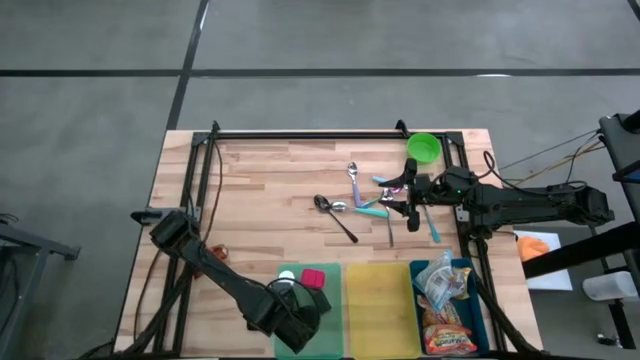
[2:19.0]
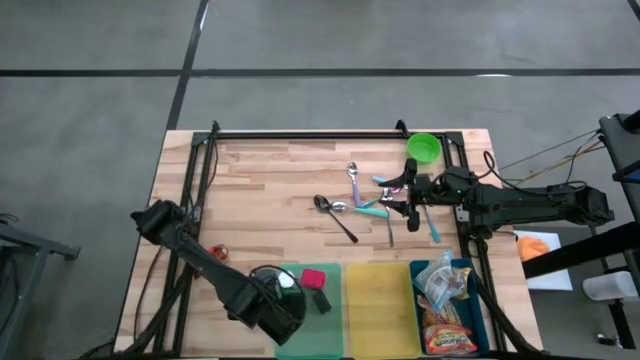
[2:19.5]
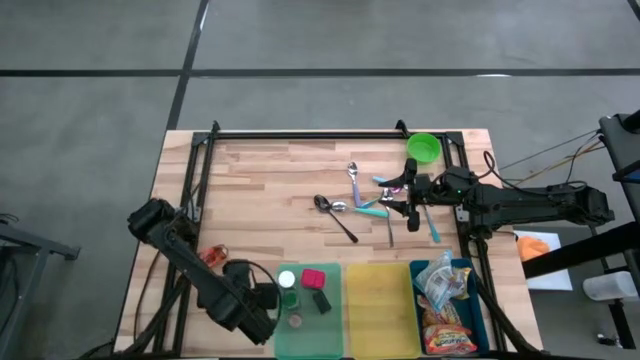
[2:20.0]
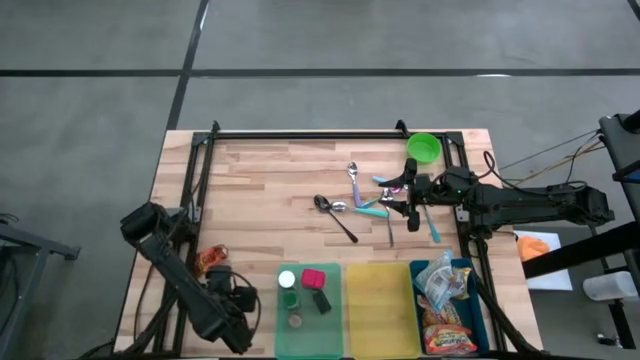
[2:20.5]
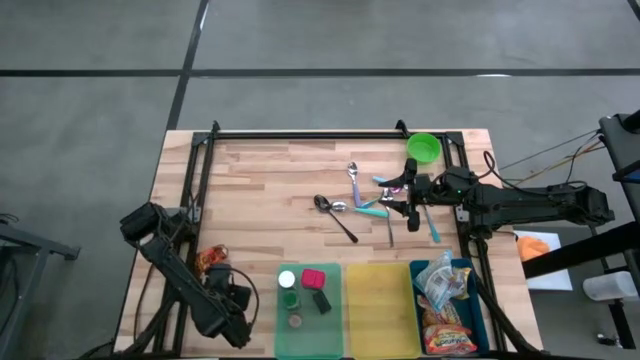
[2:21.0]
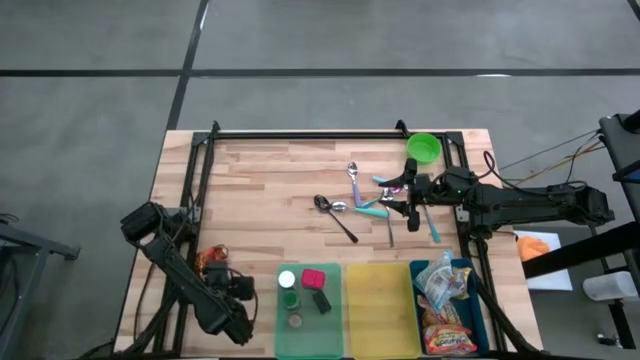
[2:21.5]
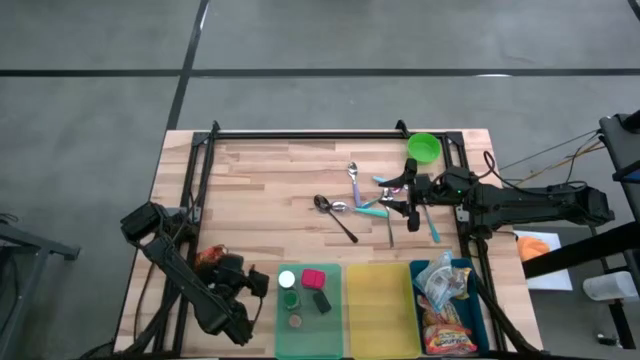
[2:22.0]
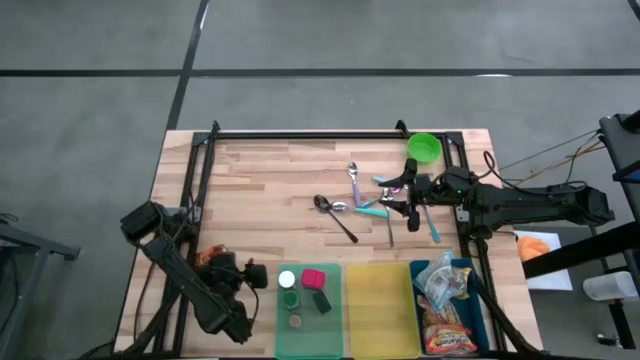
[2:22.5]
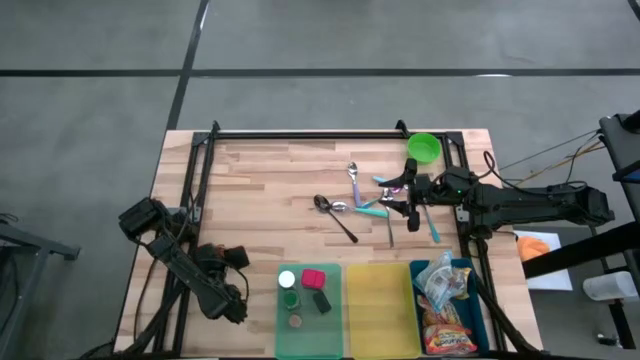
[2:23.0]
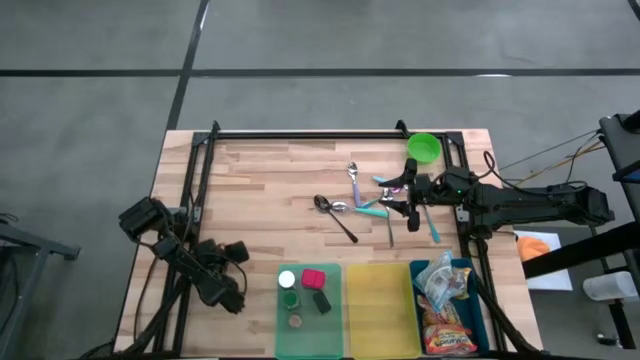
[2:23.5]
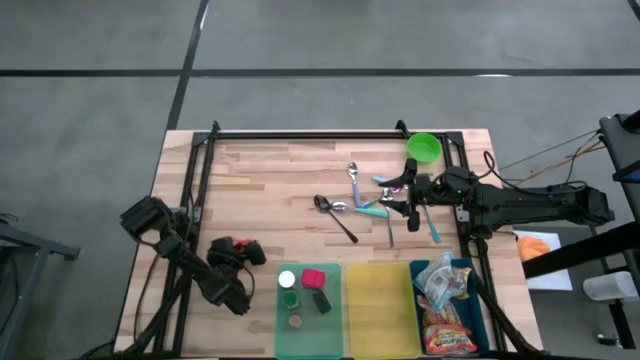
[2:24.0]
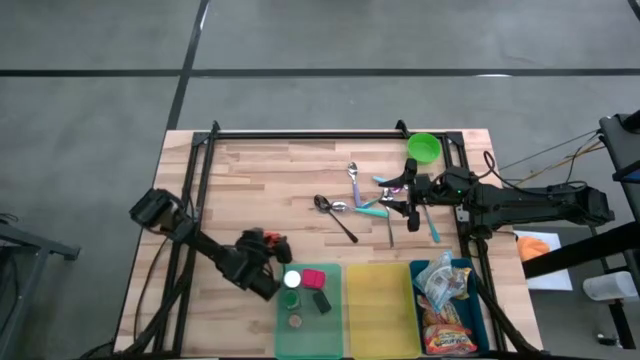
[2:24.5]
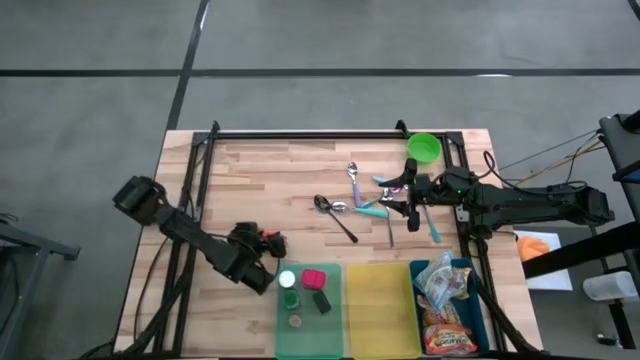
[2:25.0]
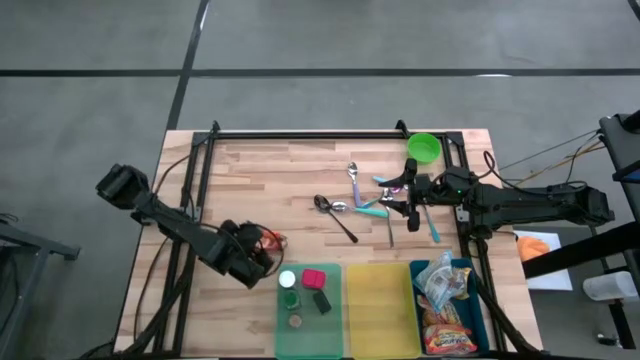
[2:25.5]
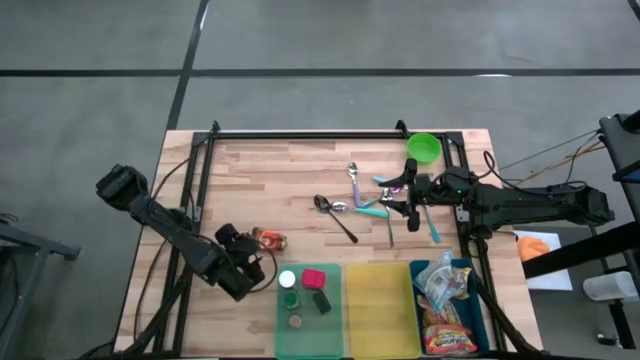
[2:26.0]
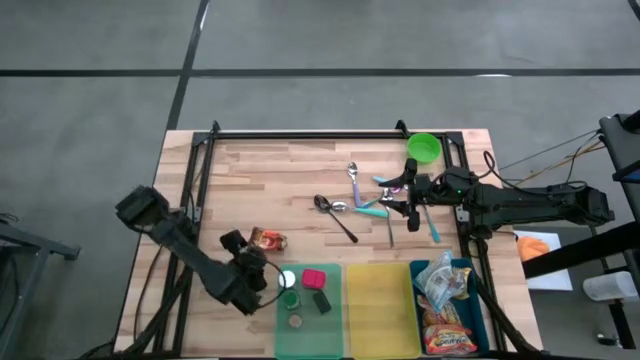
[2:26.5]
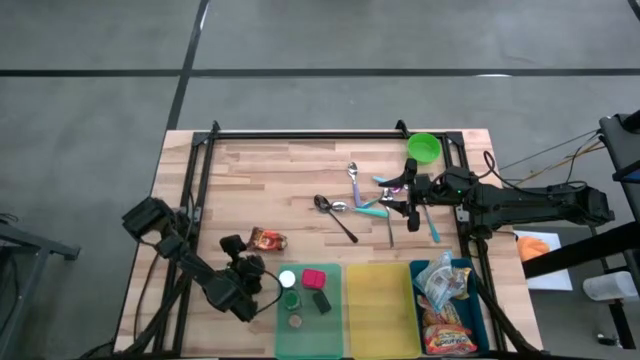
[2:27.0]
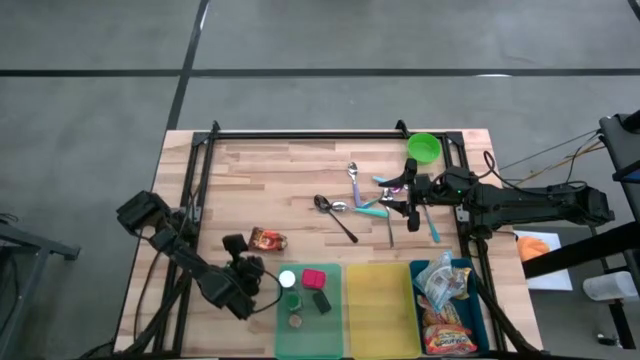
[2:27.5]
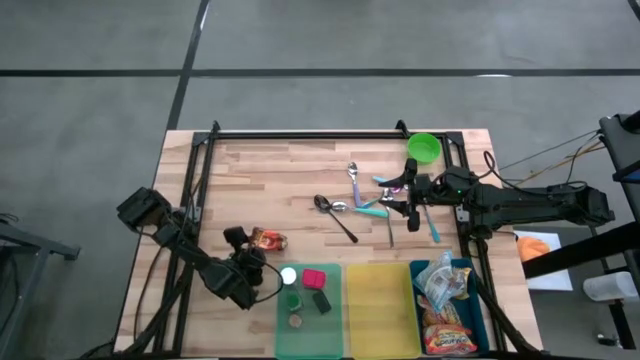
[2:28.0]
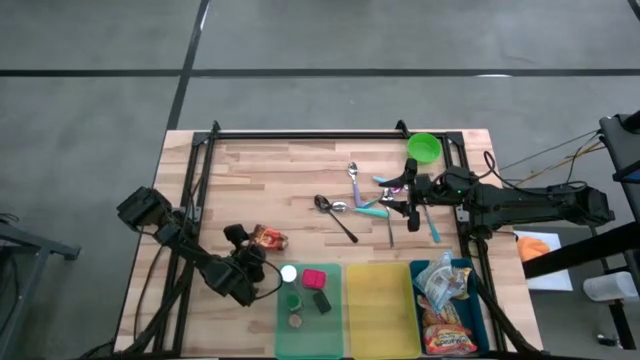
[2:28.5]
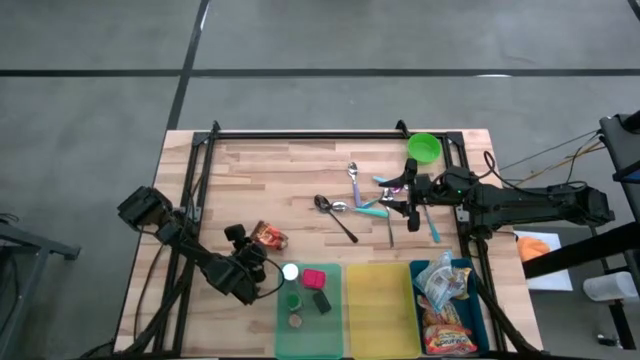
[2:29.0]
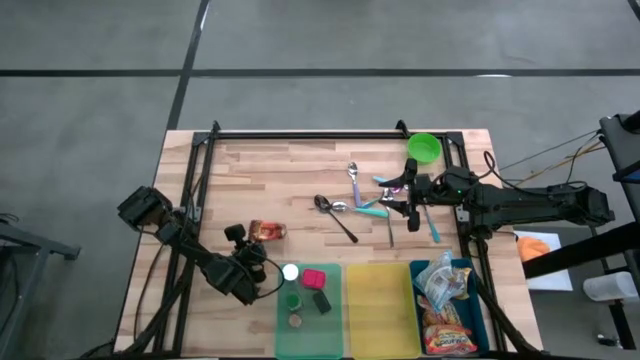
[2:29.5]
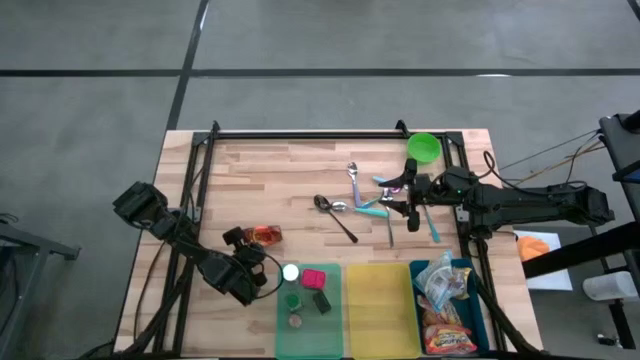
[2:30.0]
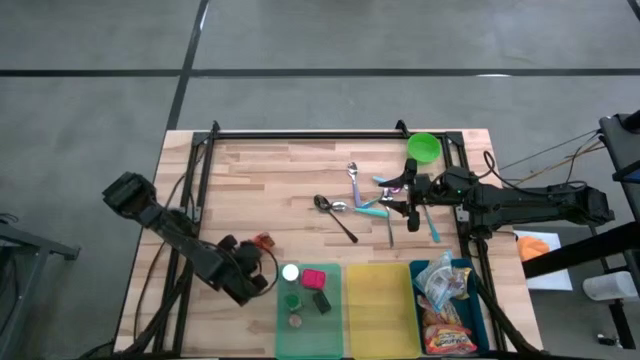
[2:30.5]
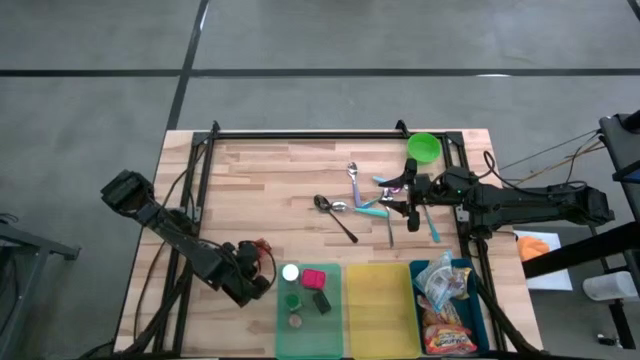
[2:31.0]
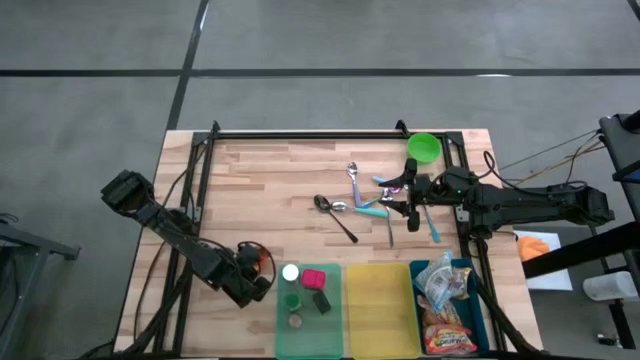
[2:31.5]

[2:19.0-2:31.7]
Put the orange seasoning pack into the green bin
